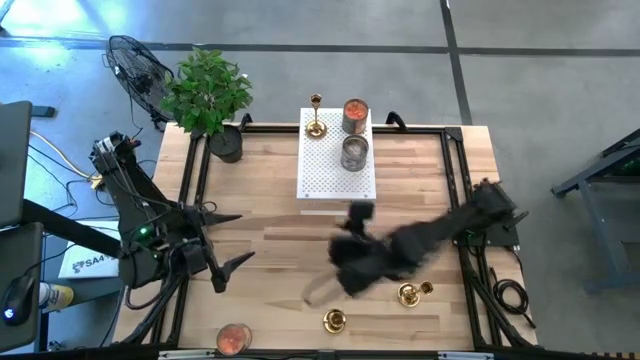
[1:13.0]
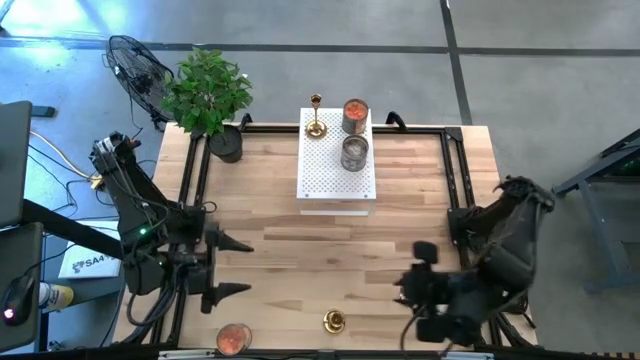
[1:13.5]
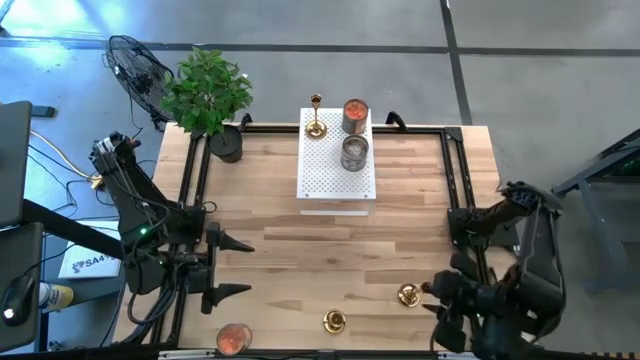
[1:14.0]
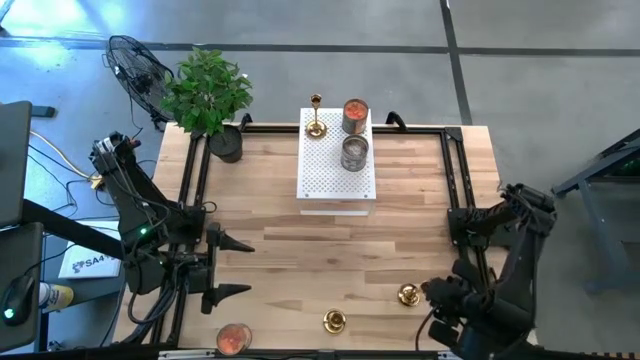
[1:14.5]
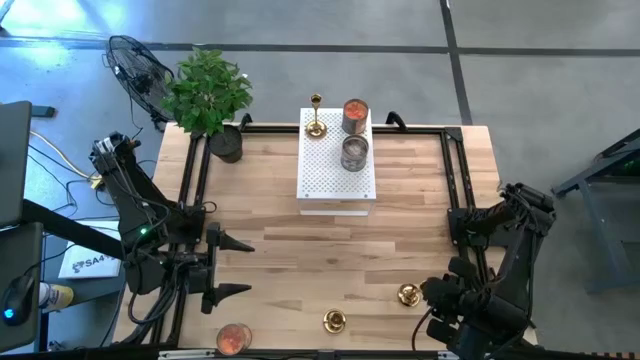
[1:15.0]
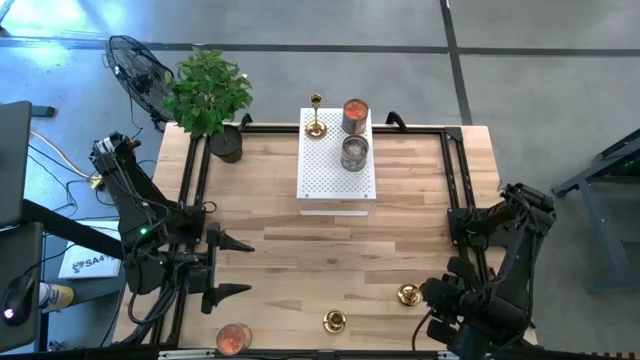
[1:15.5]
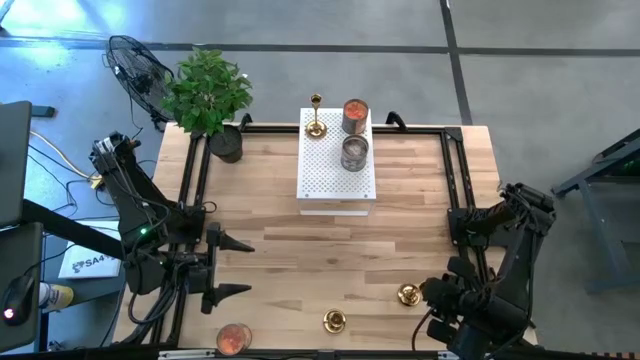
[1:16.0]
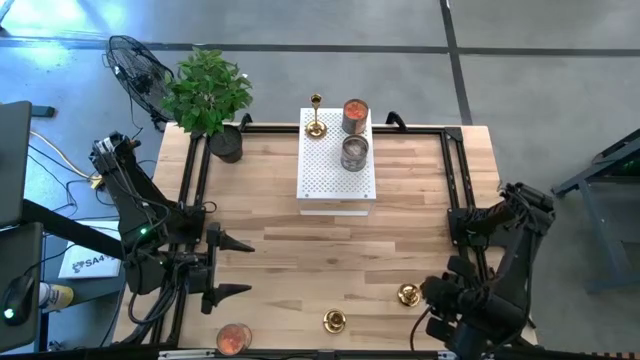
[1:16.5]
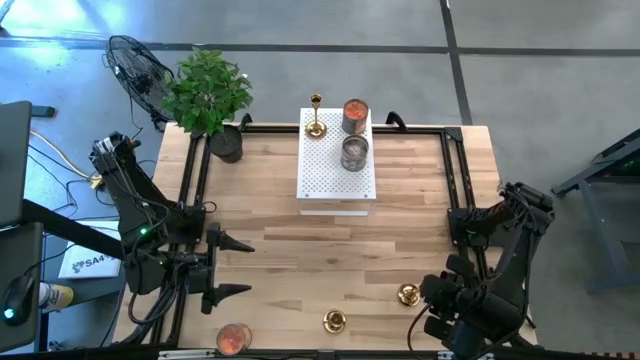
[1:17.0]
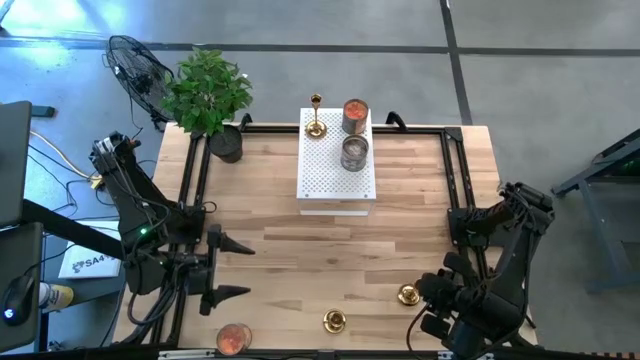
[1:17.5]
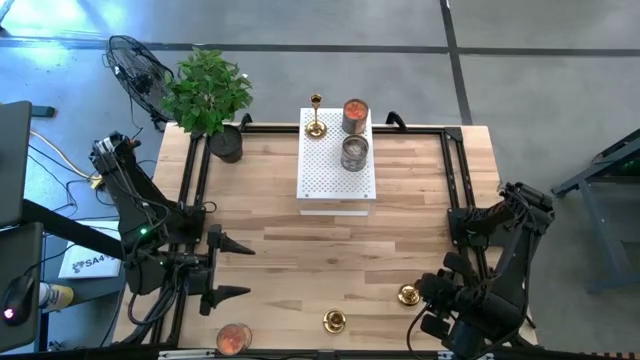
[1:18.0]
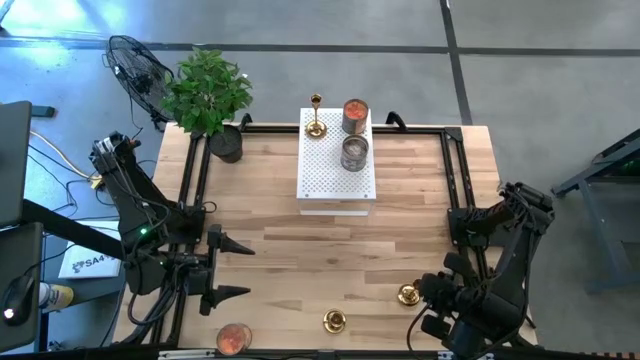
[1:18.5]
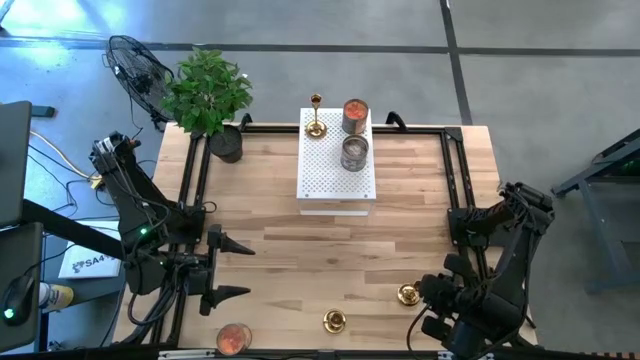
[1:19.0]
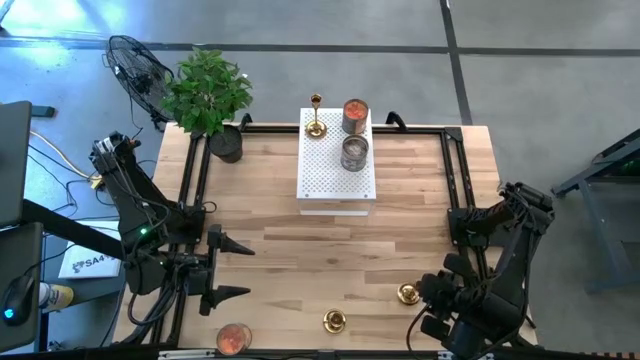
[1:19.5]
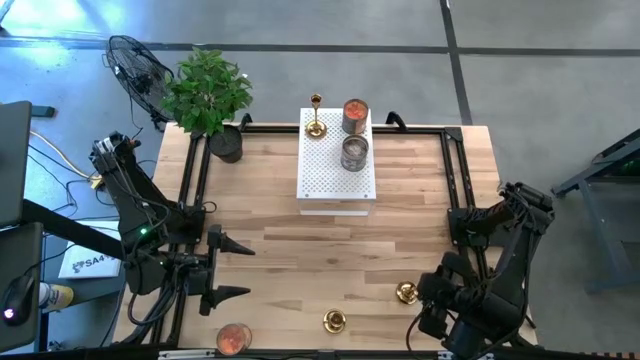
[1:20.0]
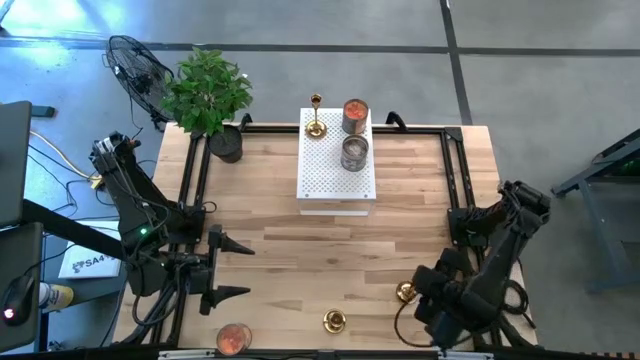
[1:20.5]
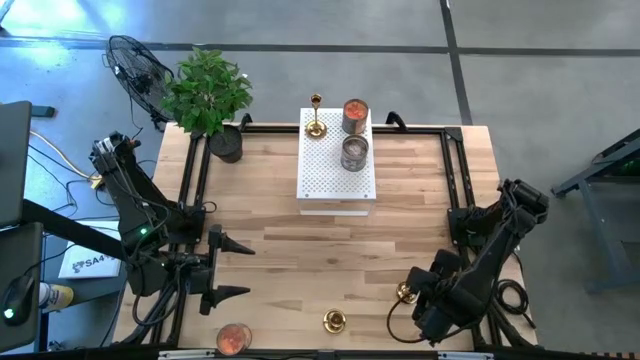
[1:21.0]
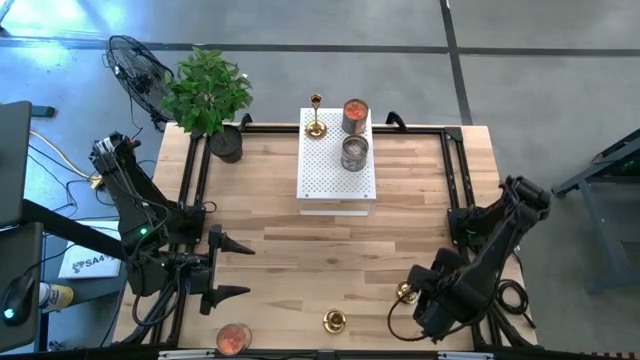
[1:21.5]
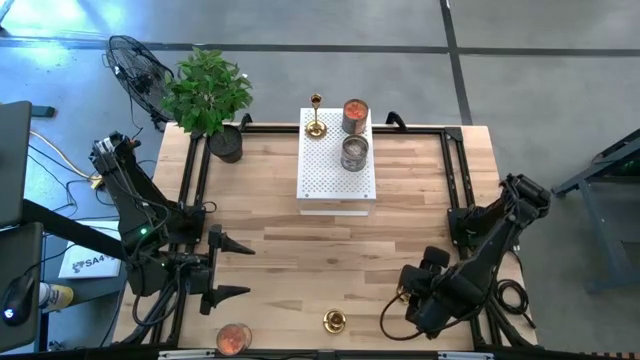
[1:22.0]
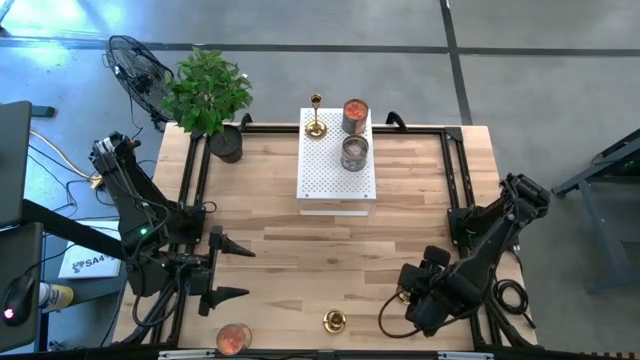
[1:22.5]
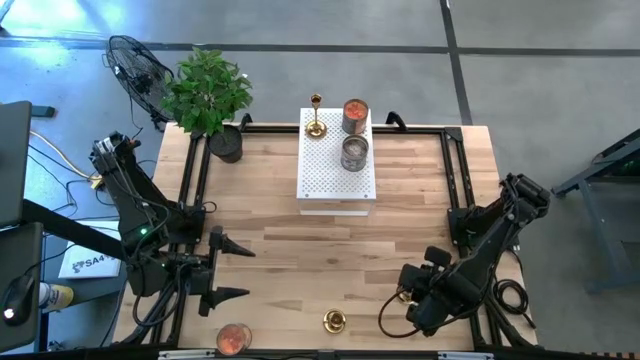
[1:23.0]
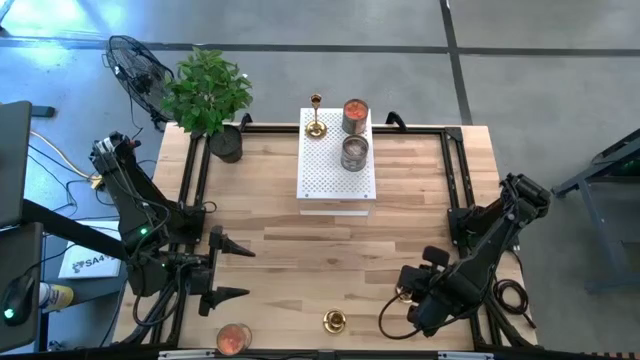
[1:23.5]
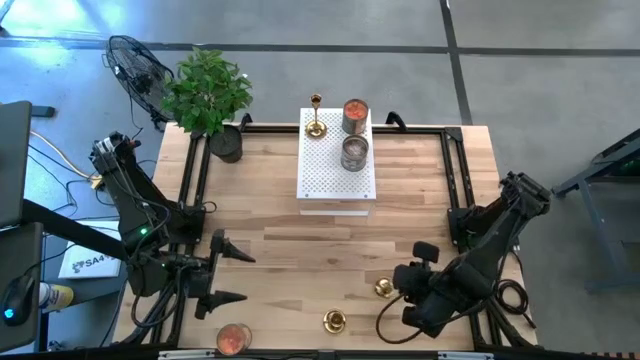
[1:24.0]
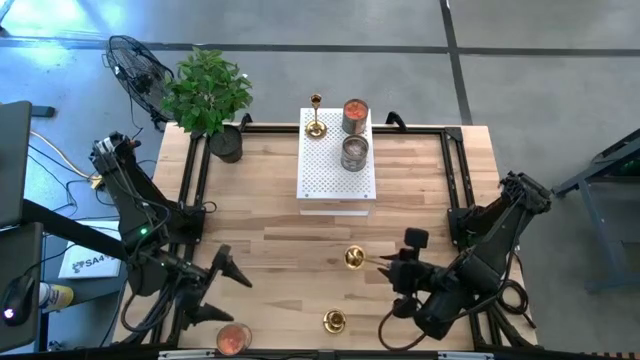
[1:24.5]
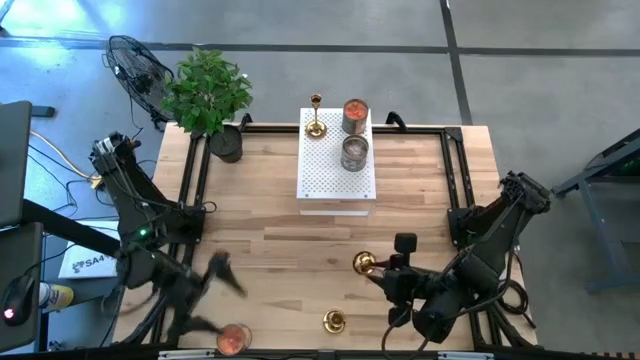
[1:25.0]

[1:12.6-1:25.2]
Task: Pick & Place candle stick holders
Put the top gold candle holder on the shelf

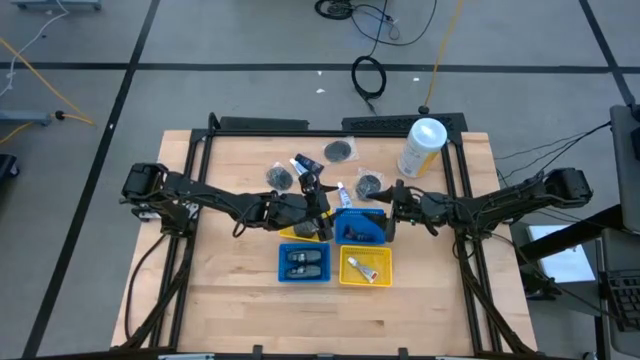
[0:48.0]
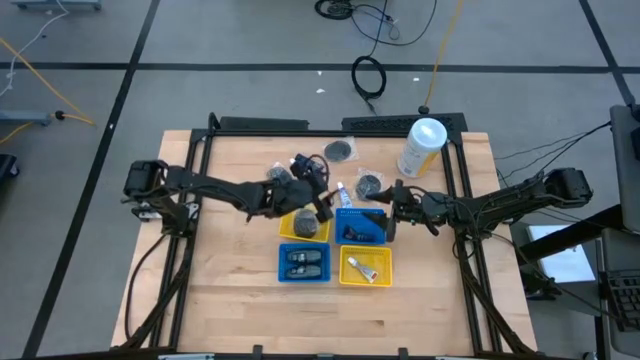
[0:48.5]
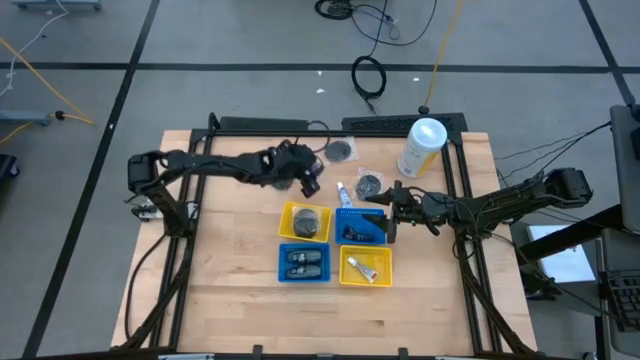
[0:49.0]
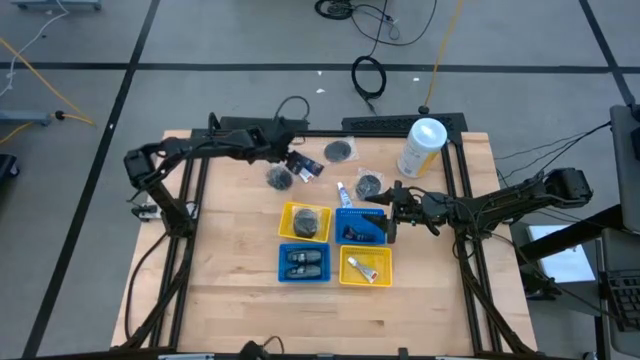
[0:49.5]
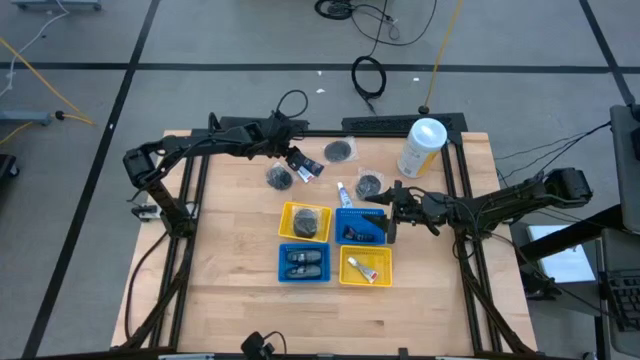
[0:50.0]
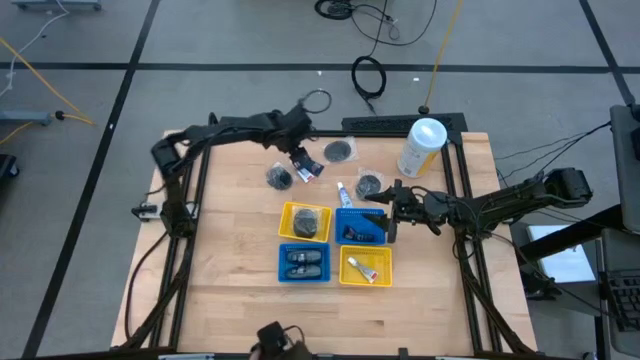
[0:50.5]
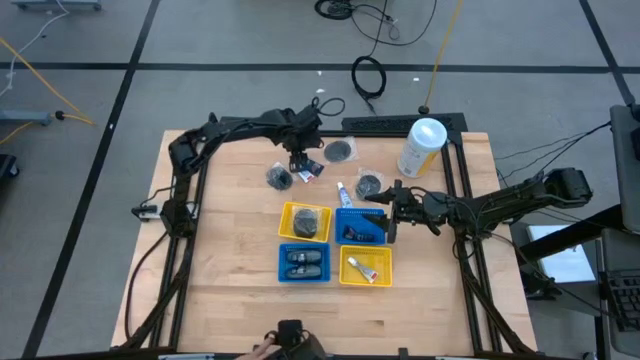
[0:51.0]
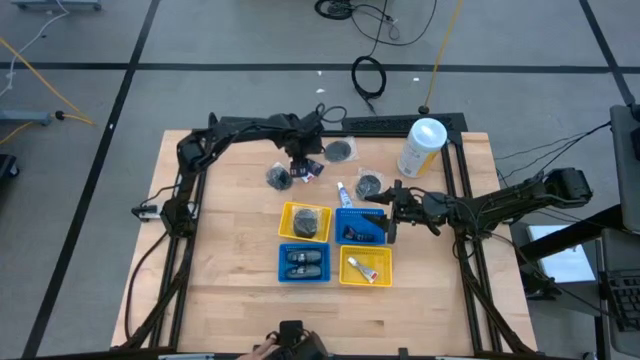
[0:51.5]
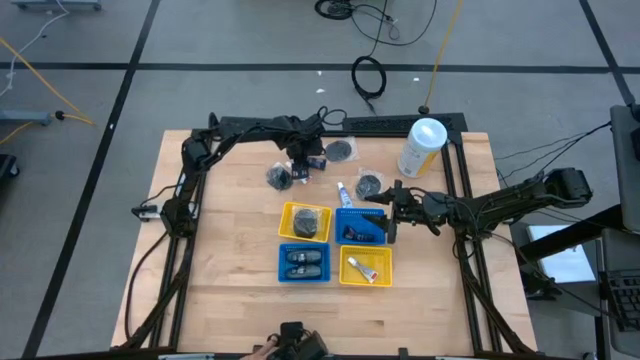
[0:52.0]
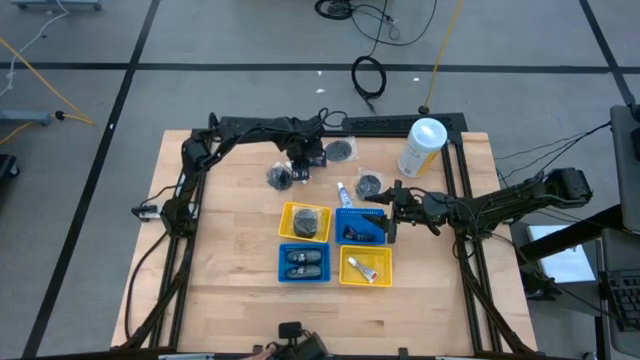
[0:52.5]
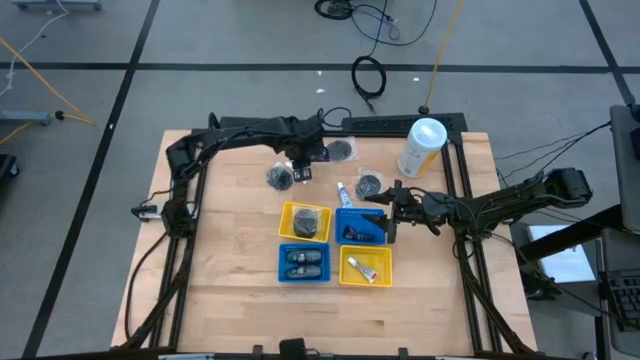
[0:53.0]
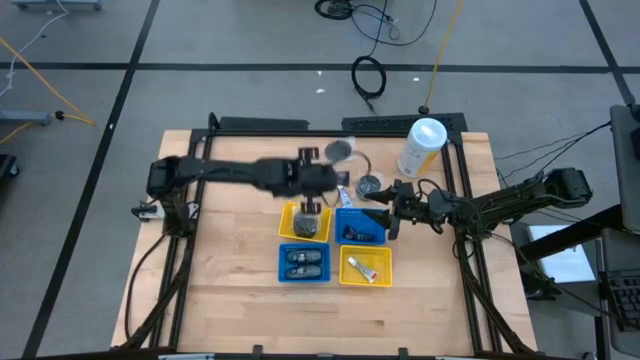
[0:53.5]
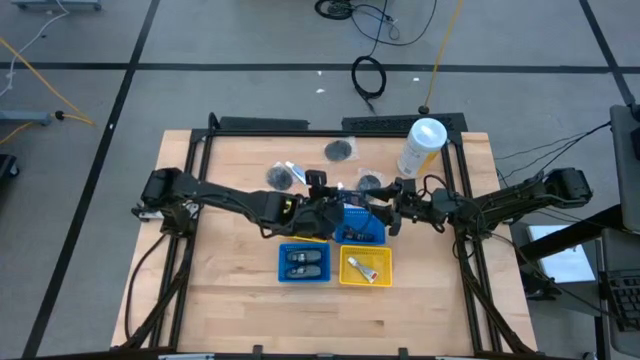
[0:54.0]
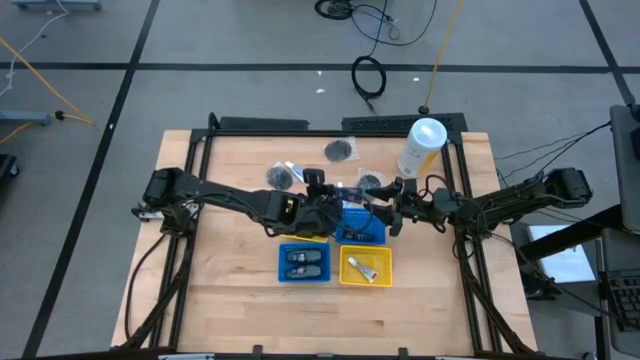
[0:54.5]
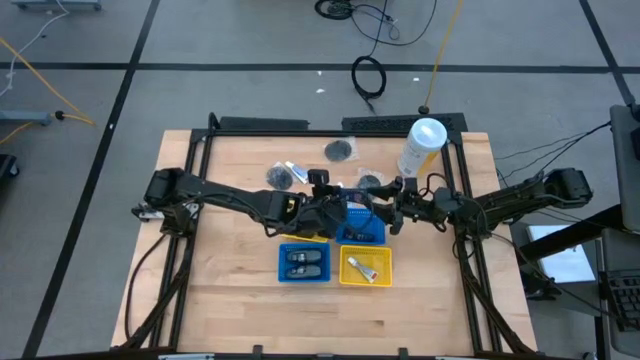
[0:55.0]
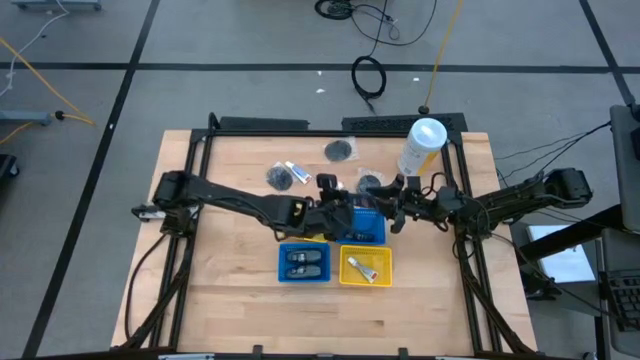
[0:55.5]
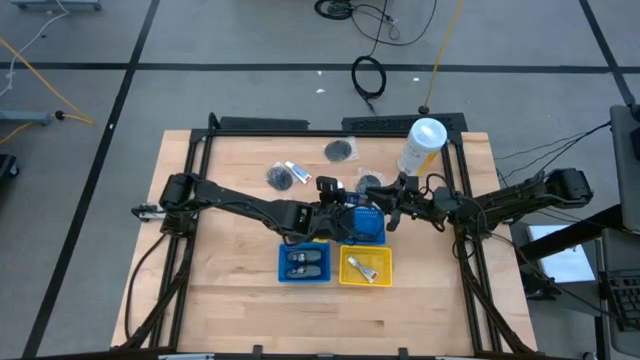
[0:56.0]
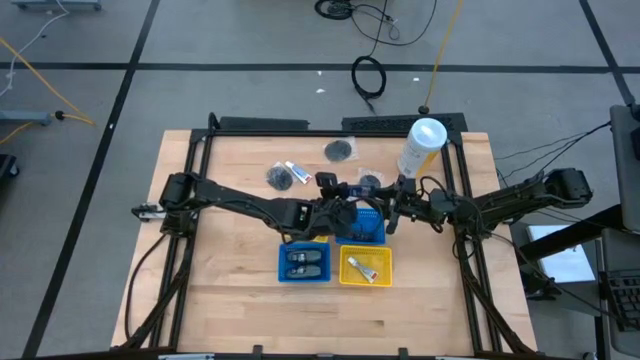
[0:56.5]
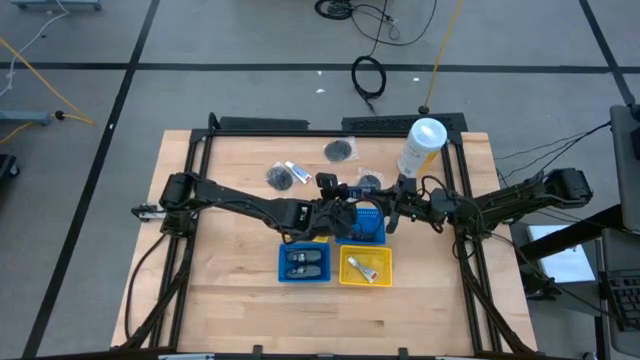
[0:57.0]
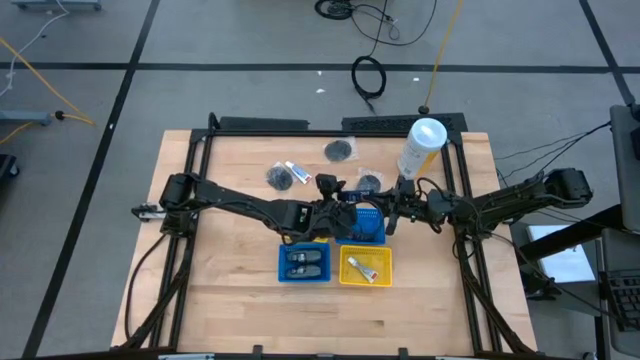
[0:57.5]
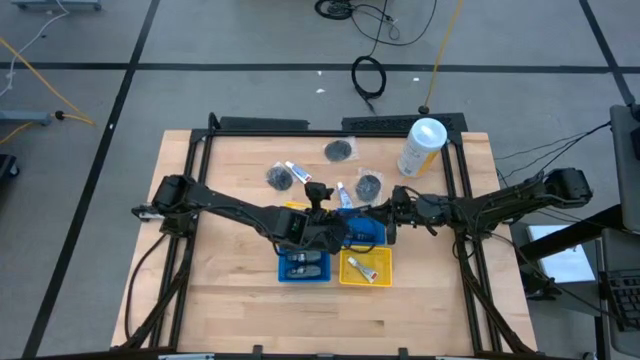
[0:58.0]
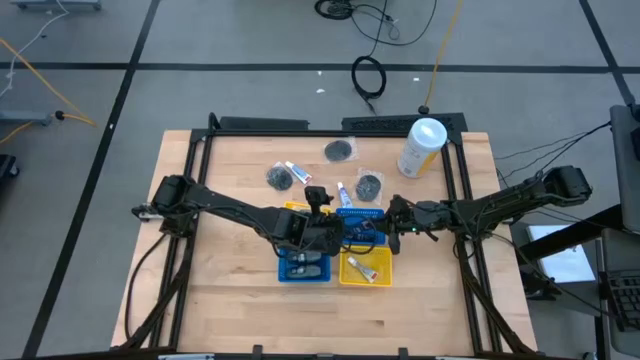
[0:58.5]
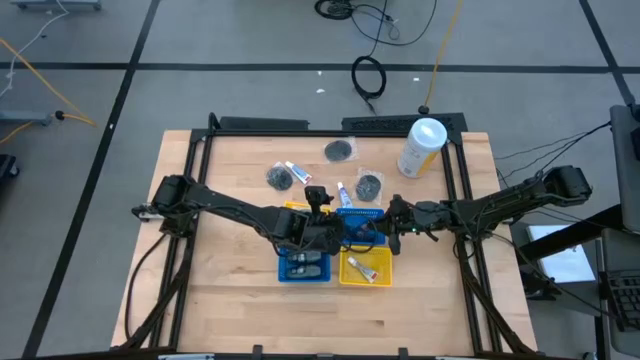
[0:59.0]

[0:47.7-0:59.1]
Task: Pick & Place Travel size toiletries
Put the blue shave cream into the top blue basket
